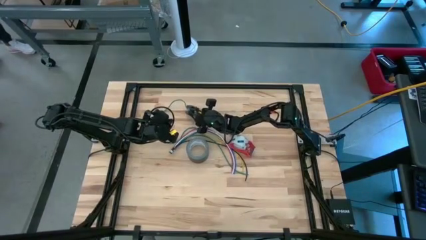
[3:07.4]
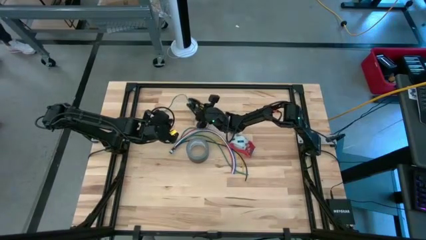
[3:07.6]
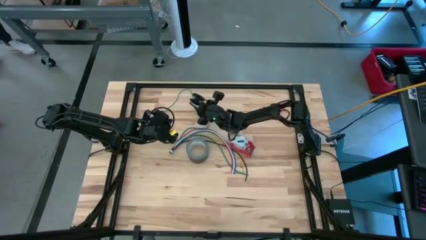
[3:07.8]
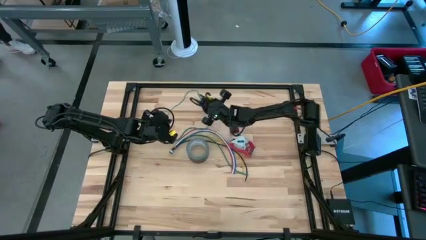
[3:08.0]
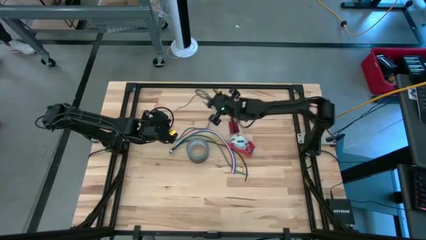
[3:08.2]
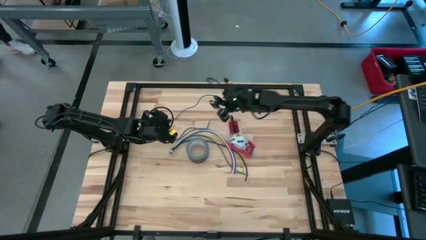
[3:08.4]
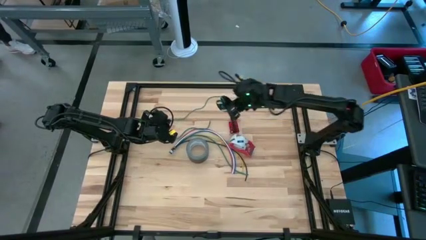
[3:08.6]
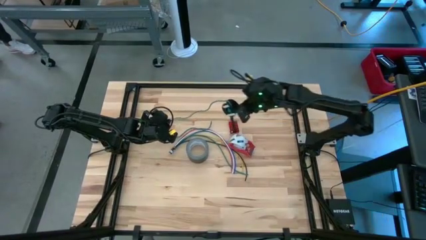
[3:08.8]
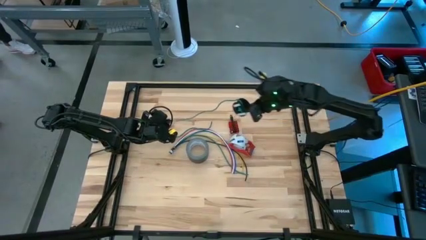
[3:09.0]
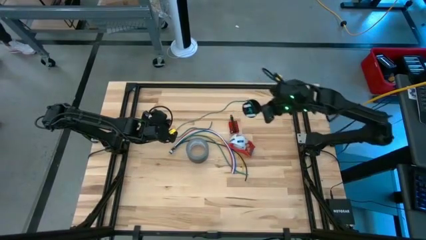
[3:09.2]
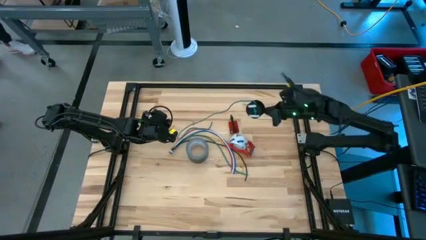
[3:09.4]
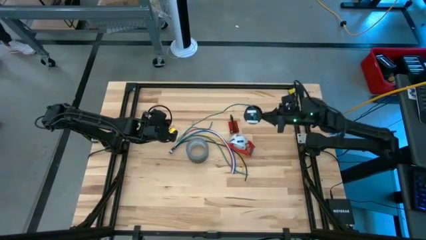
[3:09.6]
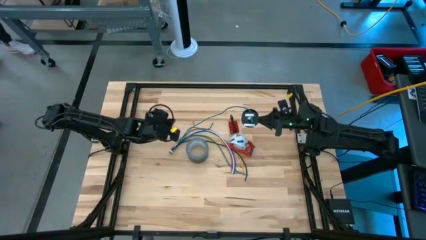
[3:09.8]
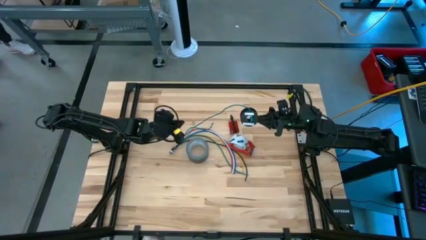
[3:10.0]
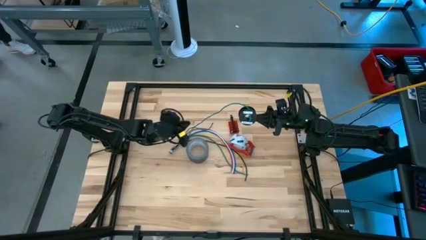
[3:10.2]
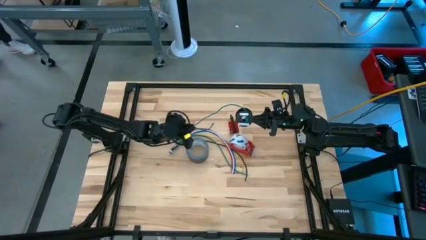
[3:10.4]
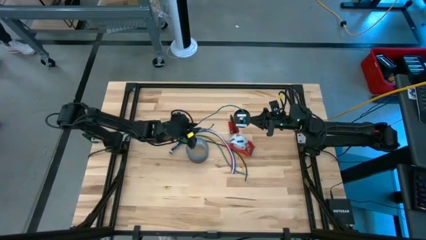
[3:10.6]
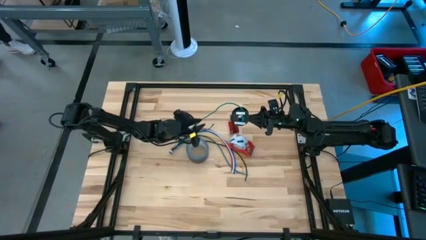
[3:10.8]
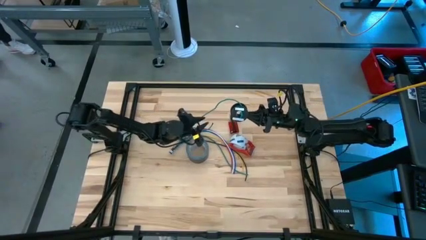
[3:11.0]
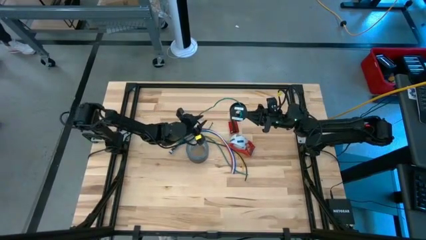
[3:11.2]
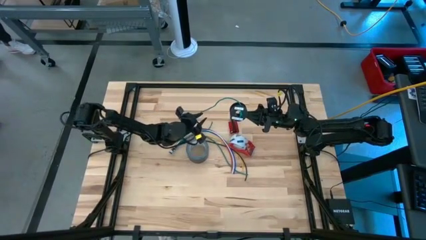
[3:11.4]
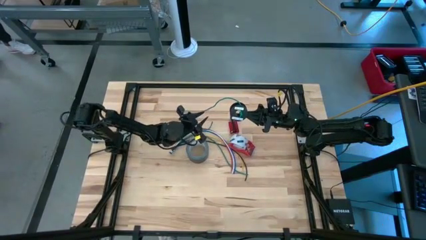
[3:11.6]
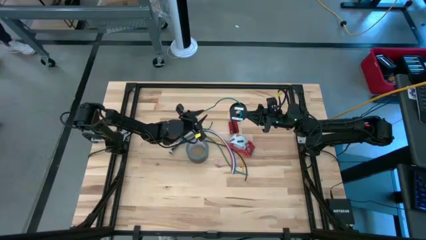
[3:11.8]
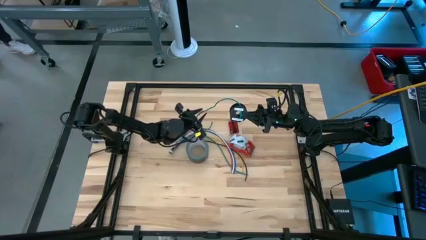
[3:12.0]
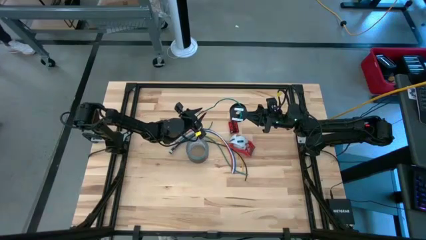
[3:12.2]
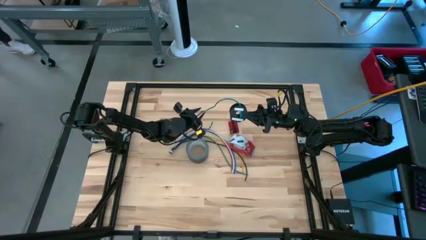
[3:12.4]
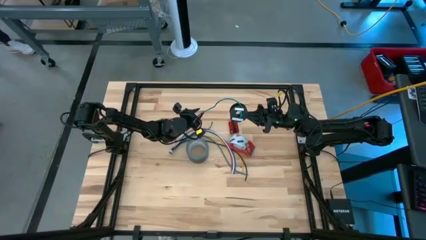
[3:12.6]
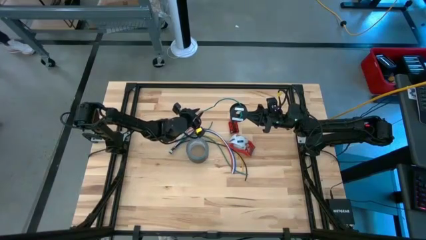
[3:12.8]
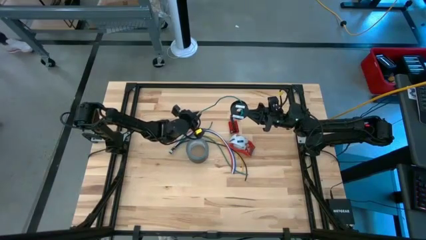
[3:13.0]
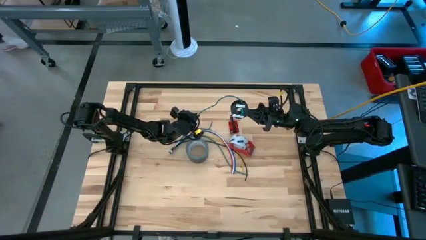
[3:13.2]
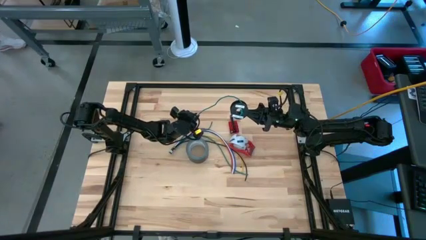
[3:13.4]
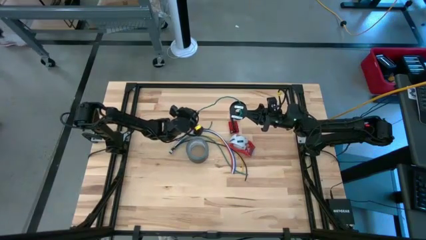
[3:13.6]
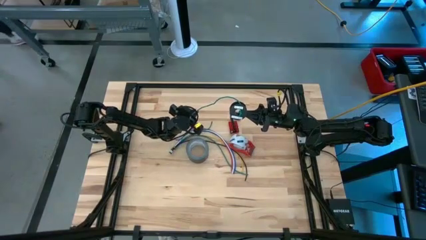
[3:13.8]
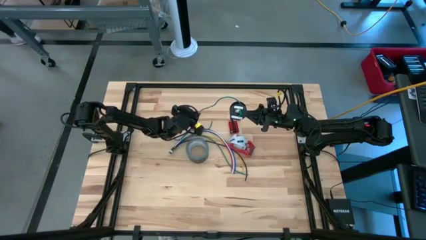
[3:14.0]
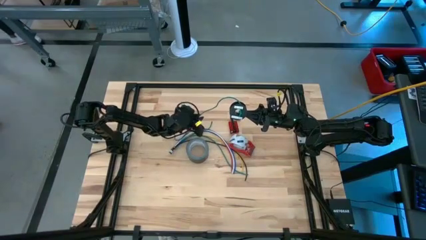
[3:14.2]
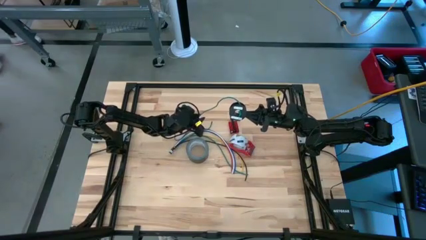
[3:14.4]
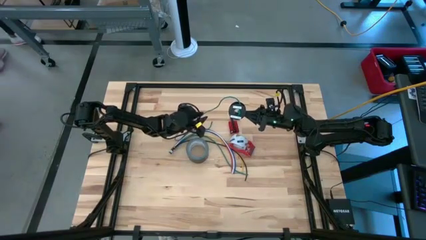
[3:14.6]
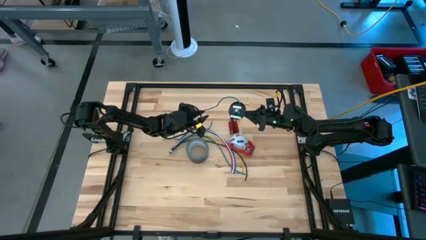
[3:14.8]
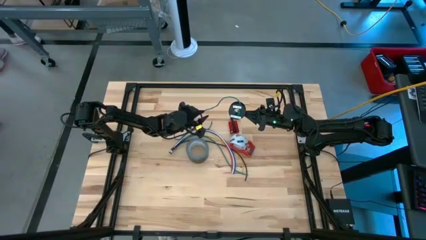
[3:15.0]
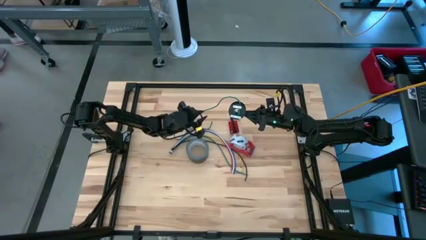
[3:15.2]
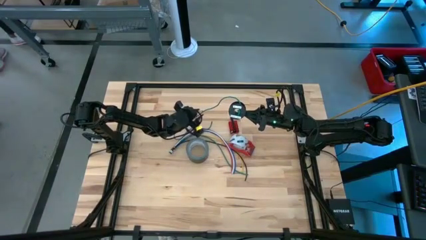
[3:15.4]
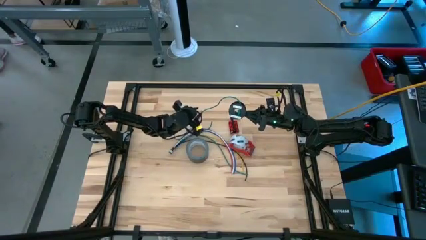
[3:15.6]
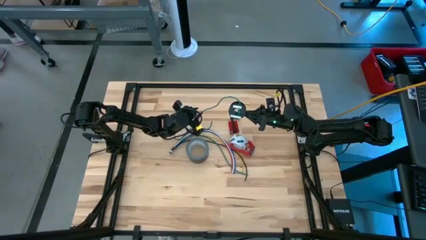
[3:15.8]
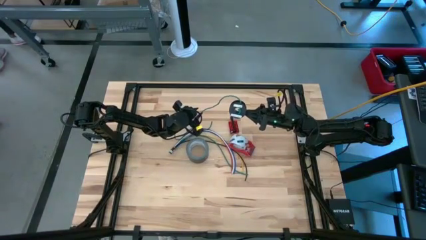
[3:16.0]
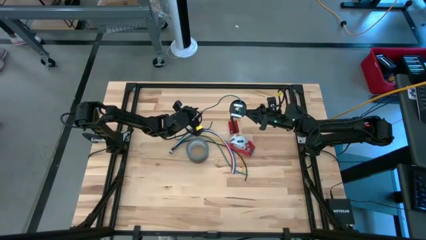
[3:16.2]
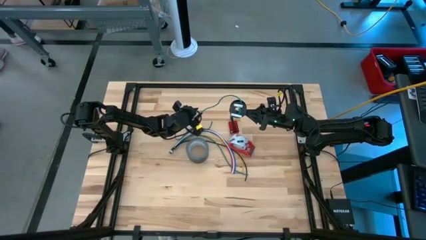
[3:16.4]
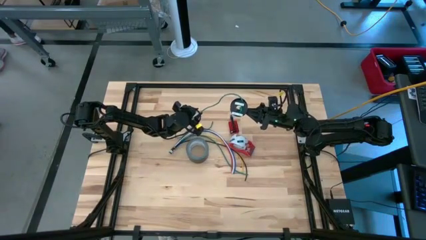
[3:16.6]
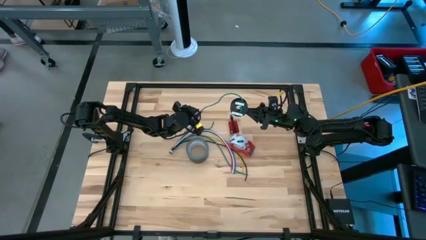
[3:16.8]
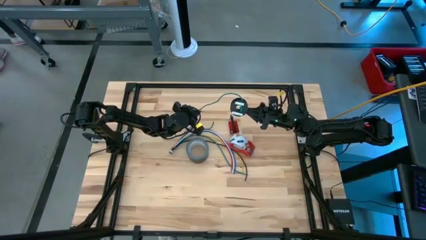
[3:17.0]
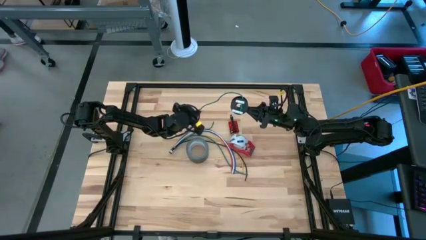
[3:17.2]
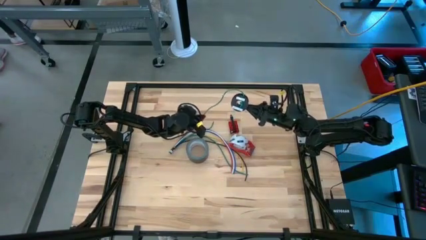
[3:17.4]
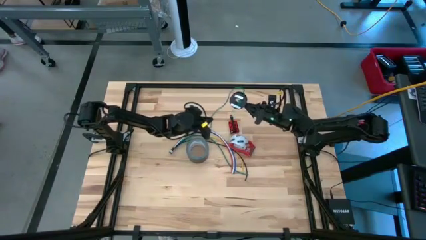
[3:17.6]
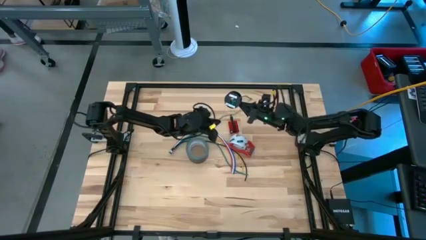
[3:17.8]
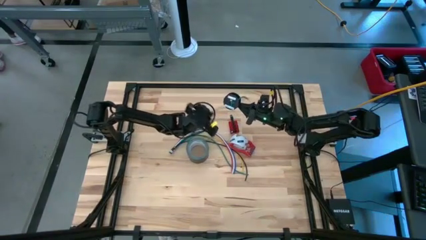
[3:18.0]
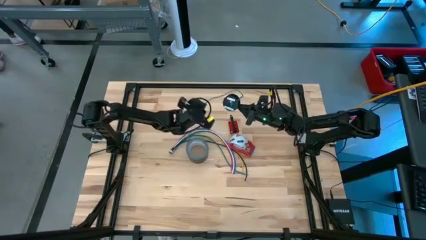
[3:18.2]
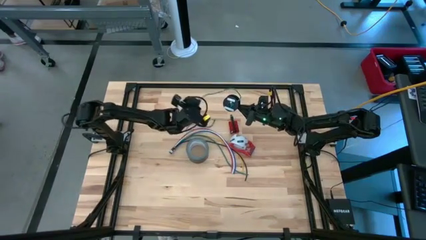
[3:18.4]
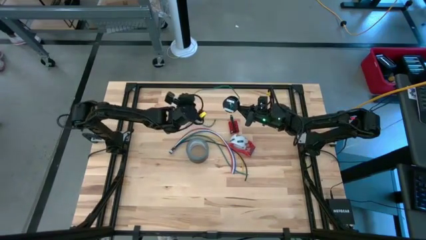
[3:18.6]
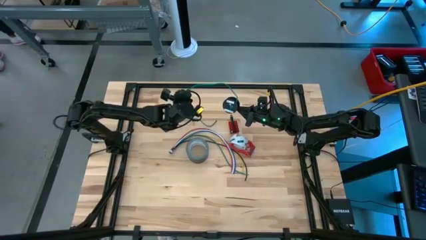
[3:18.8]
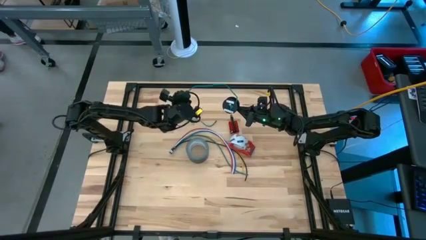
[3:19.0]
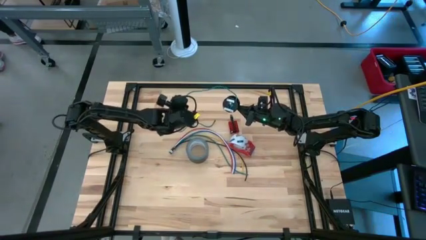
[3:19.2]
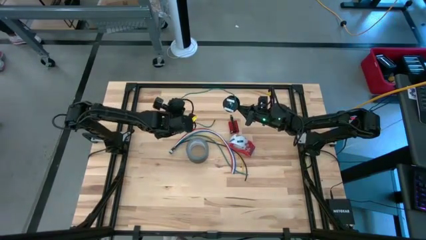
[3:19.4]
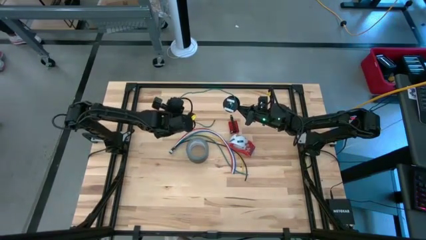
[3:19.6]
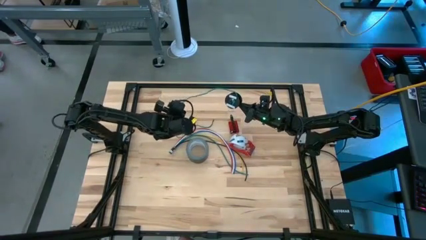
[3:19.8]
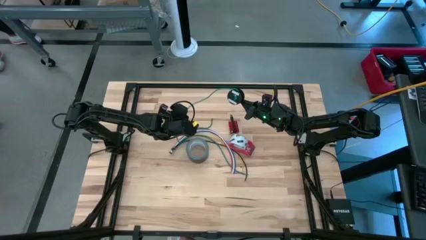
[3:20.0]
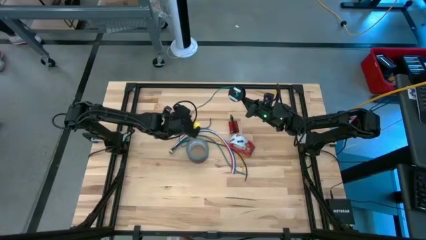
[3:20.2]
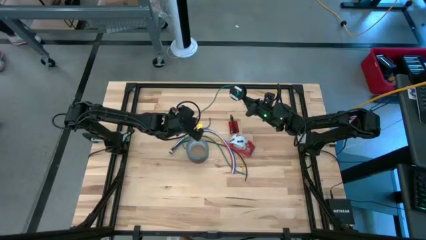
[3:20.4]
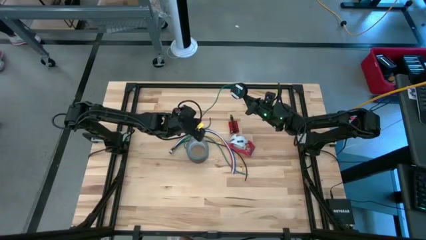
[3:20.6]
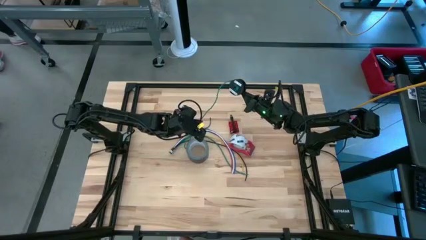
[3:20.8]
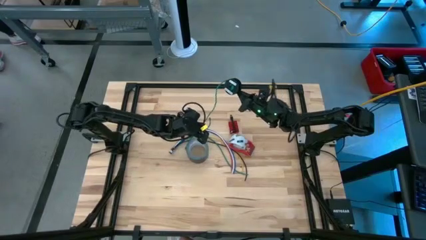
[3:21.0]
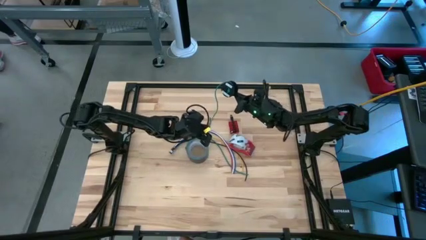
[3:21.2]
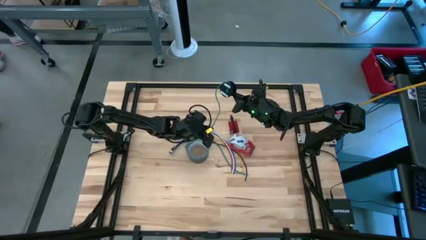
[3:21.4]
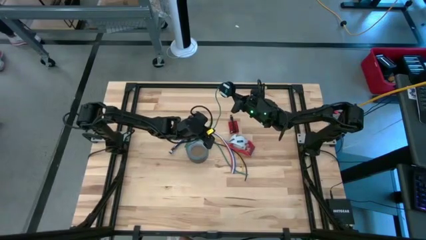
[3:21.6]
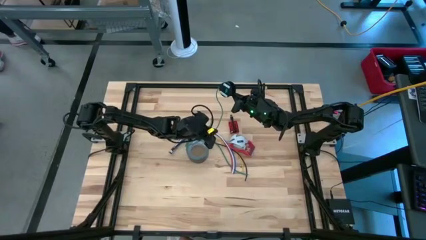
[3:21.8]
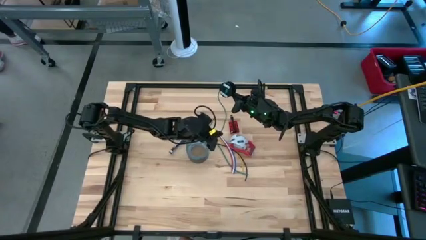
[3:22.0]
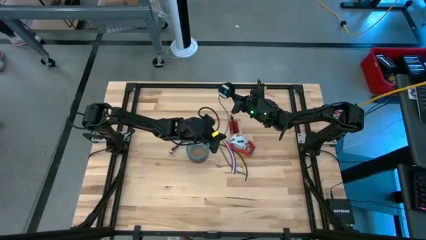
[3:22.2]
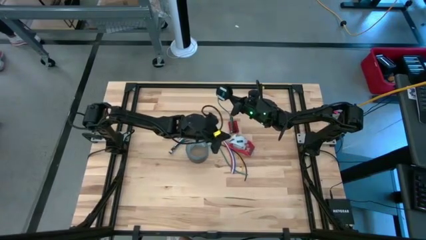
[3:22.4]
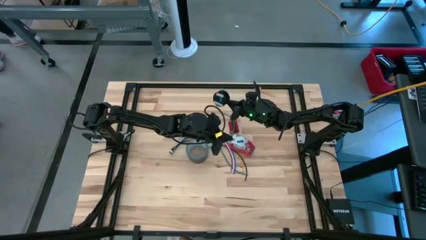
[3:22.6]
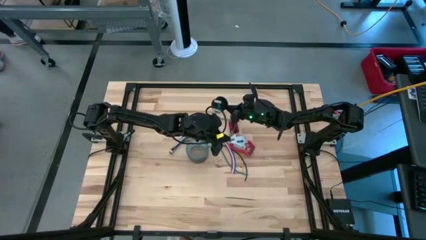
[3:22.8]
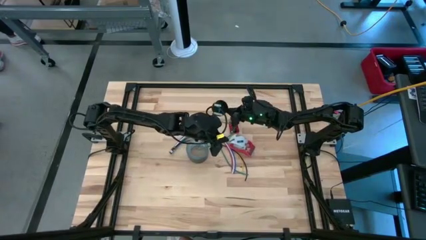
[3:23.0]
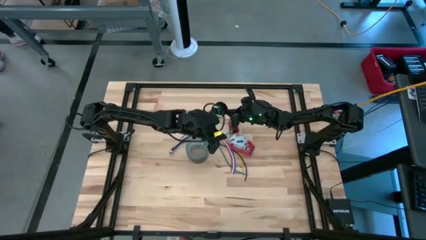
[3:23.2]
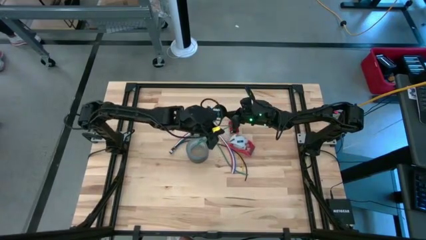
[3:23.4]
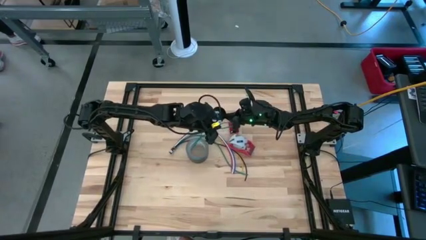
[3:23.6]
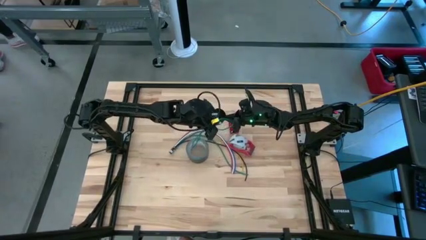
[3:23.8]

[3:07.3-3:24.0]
Task: Coil cords
Coil the green wire onto the black spool
